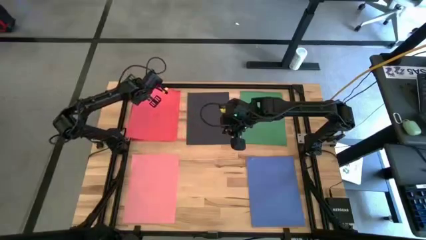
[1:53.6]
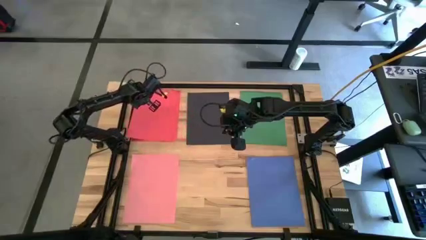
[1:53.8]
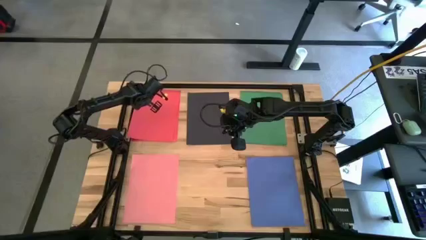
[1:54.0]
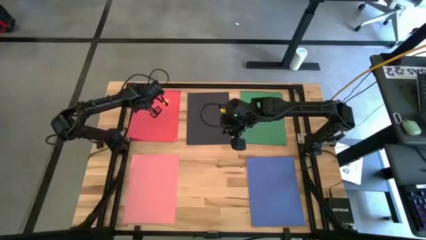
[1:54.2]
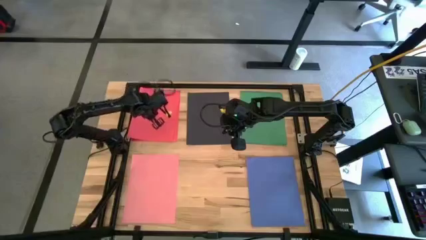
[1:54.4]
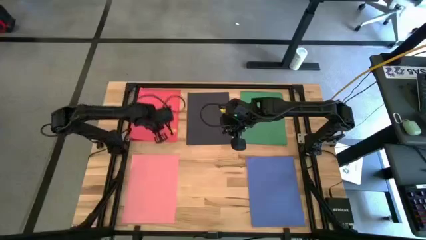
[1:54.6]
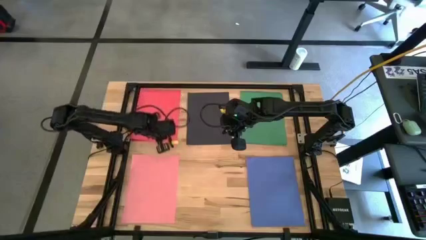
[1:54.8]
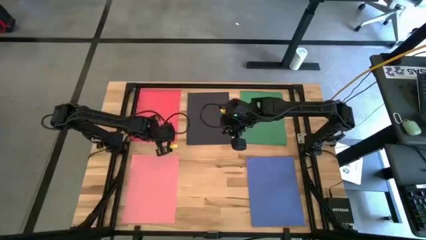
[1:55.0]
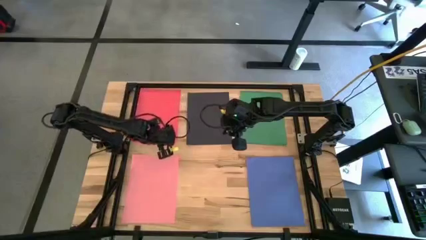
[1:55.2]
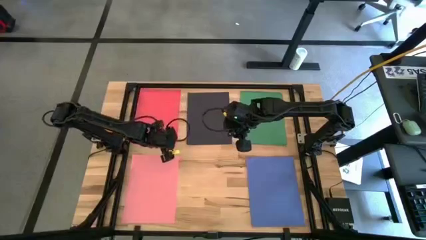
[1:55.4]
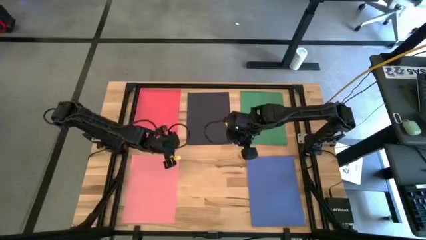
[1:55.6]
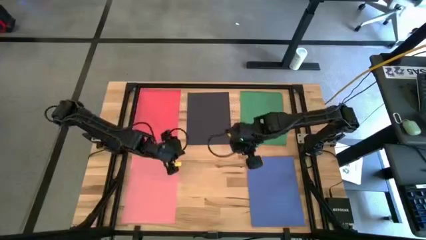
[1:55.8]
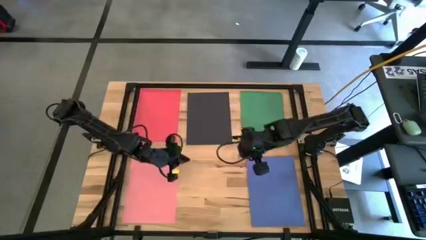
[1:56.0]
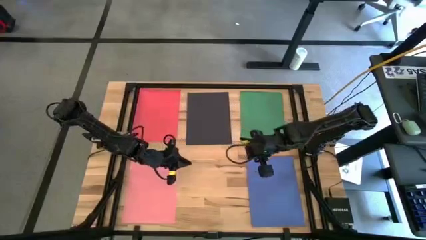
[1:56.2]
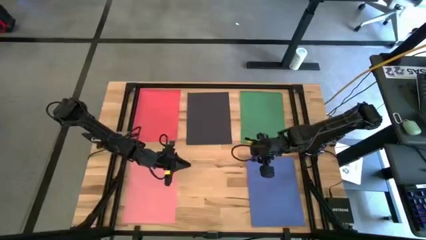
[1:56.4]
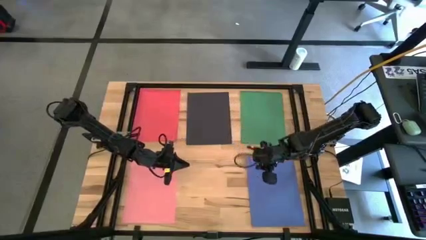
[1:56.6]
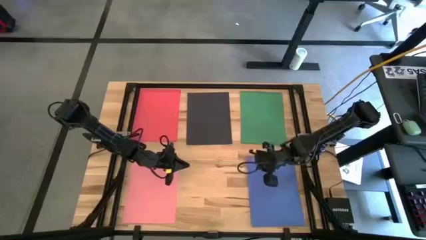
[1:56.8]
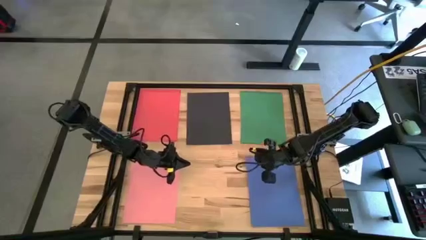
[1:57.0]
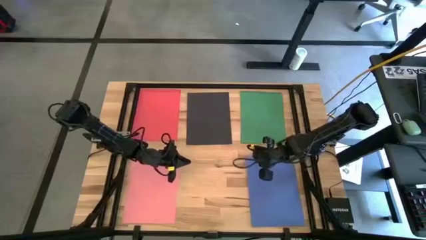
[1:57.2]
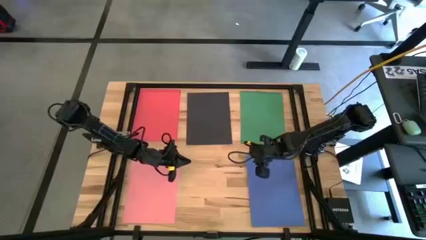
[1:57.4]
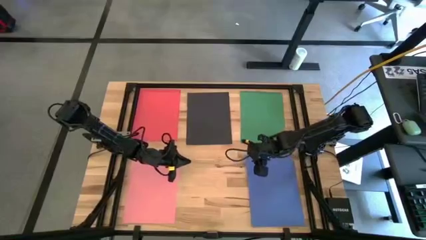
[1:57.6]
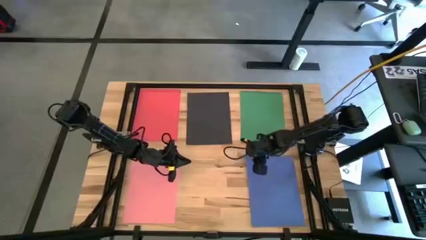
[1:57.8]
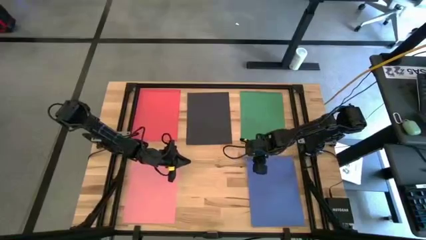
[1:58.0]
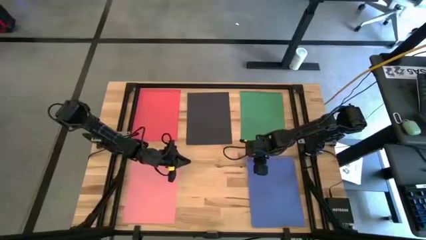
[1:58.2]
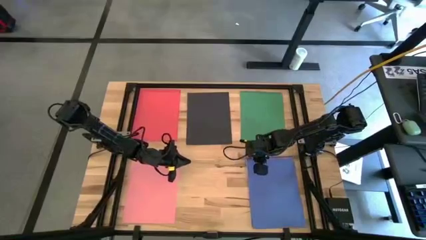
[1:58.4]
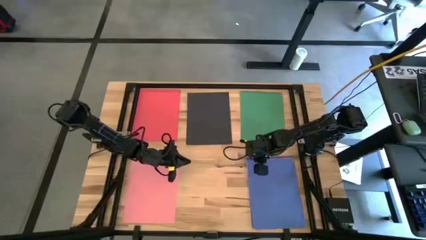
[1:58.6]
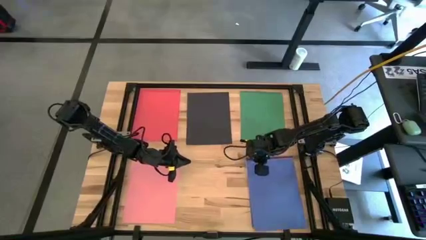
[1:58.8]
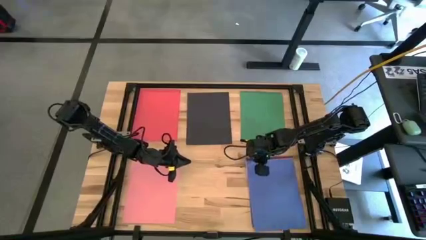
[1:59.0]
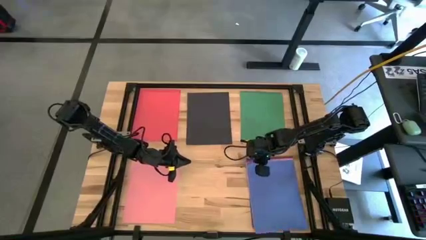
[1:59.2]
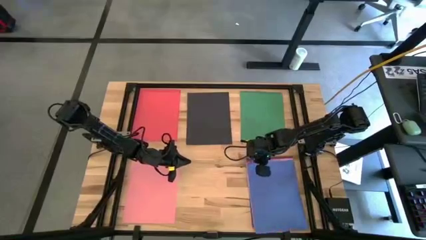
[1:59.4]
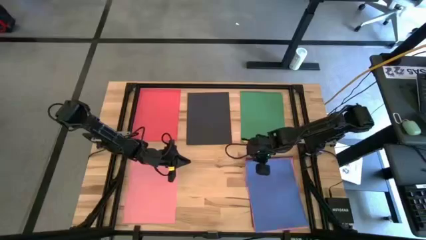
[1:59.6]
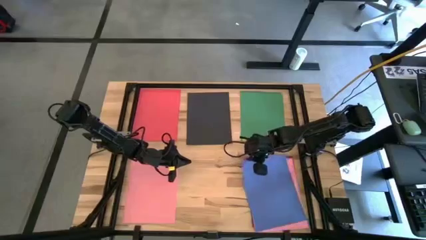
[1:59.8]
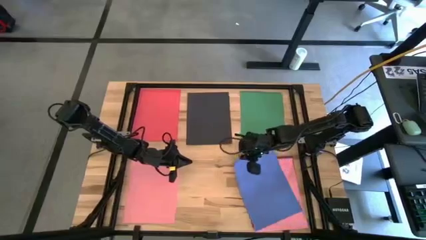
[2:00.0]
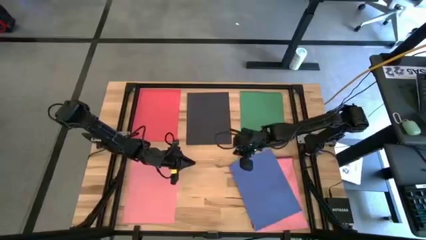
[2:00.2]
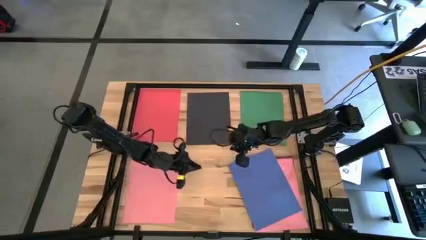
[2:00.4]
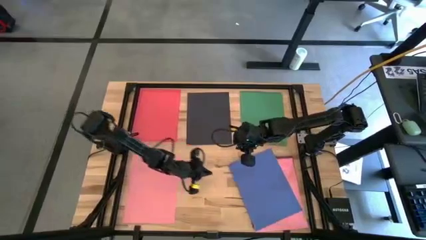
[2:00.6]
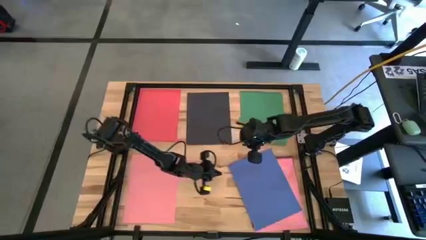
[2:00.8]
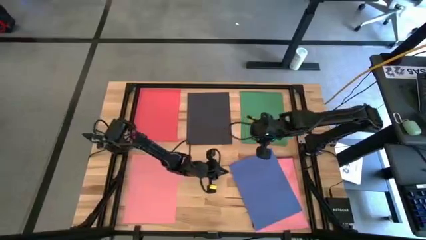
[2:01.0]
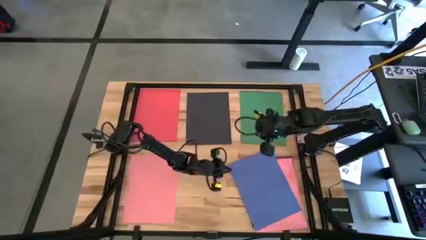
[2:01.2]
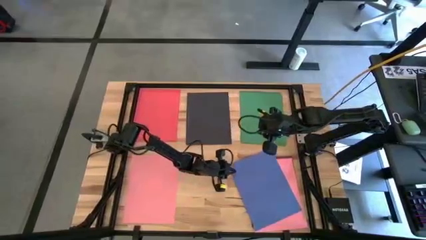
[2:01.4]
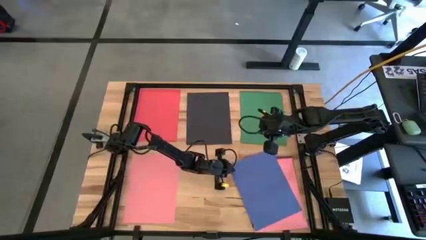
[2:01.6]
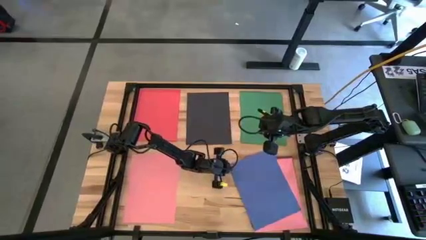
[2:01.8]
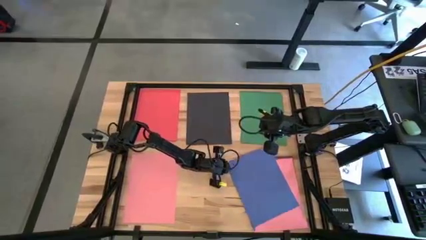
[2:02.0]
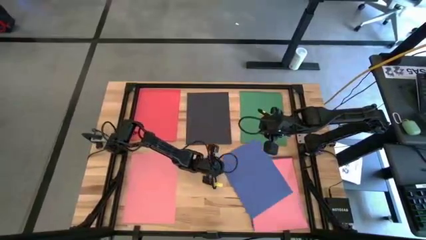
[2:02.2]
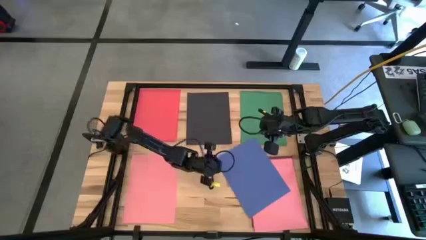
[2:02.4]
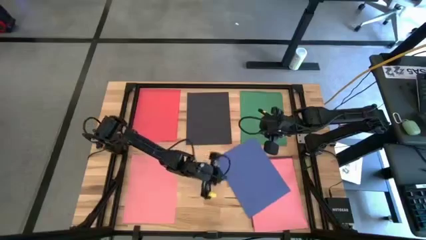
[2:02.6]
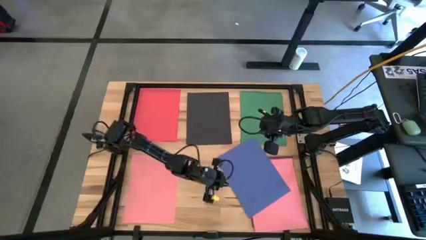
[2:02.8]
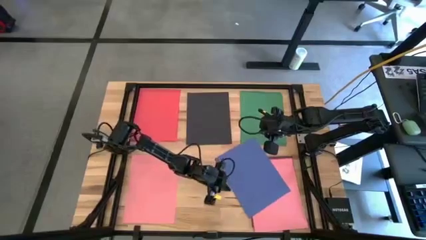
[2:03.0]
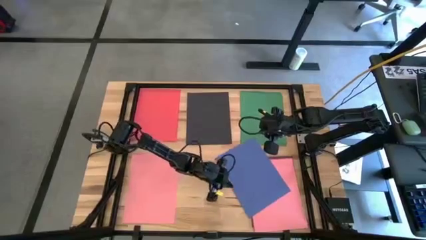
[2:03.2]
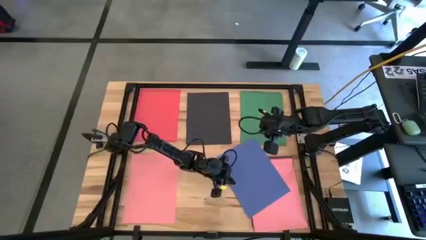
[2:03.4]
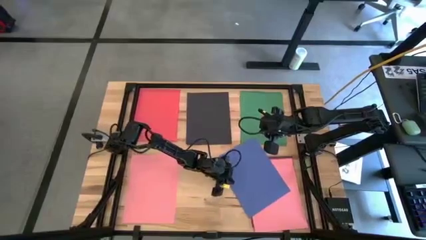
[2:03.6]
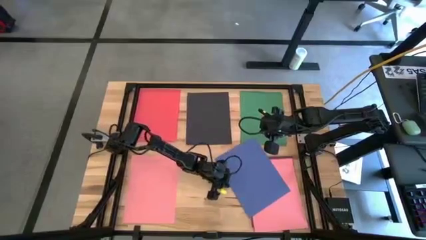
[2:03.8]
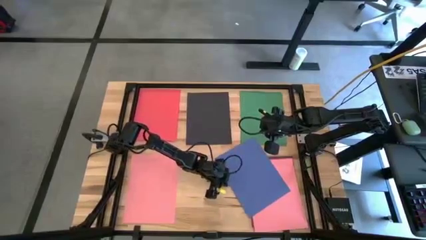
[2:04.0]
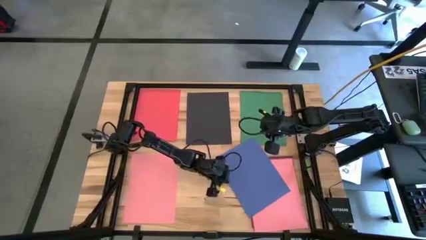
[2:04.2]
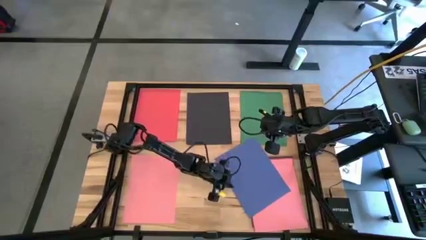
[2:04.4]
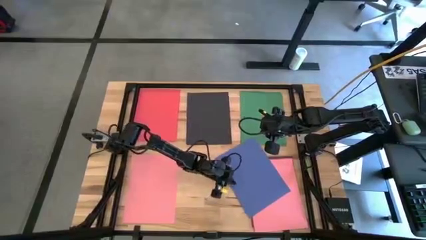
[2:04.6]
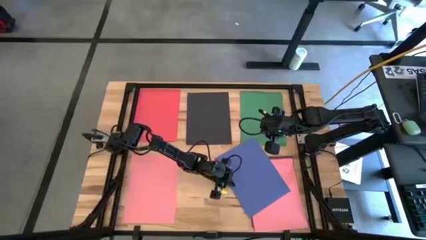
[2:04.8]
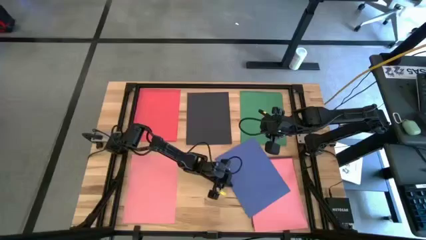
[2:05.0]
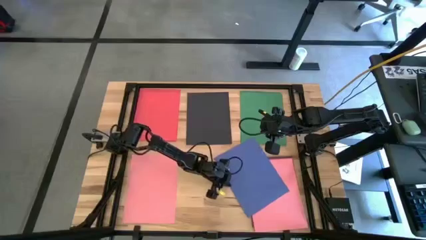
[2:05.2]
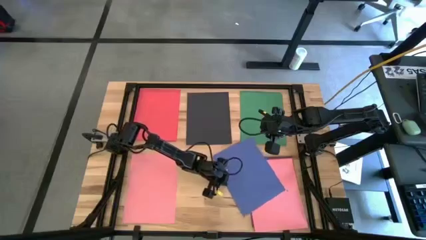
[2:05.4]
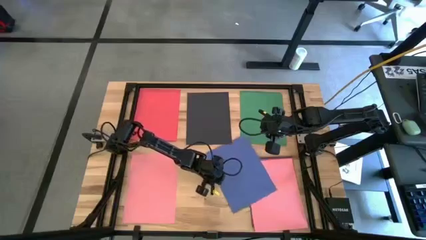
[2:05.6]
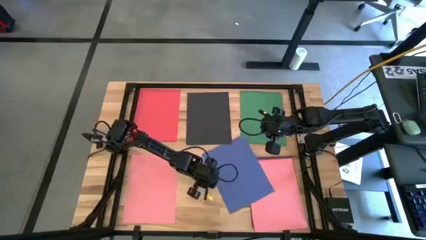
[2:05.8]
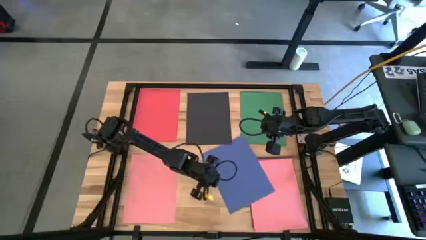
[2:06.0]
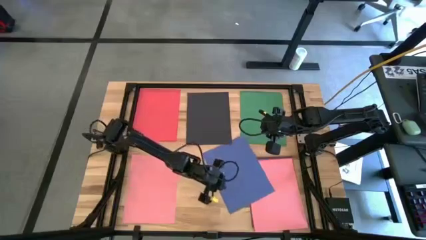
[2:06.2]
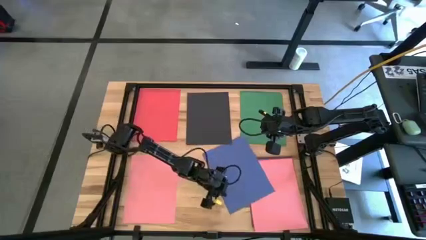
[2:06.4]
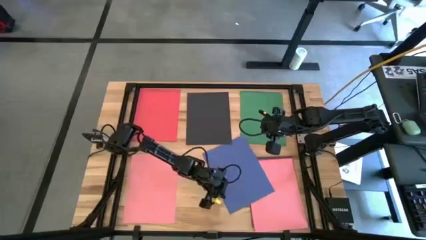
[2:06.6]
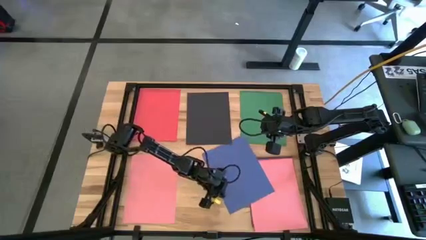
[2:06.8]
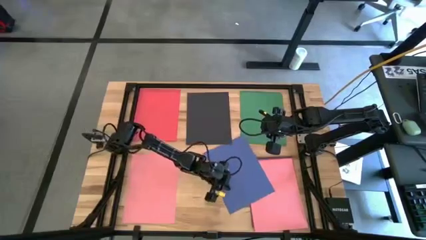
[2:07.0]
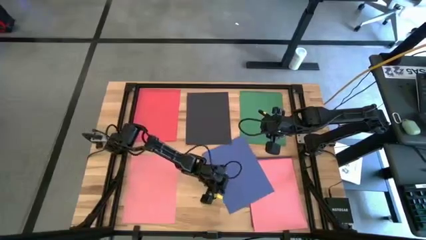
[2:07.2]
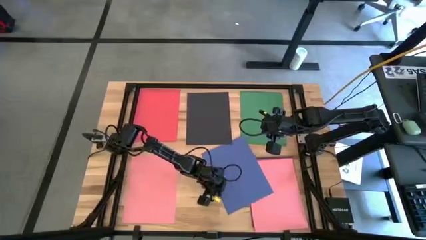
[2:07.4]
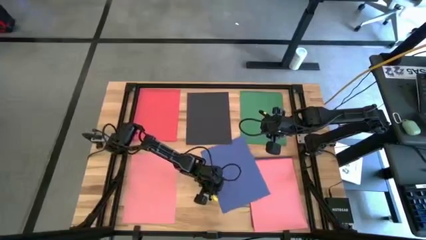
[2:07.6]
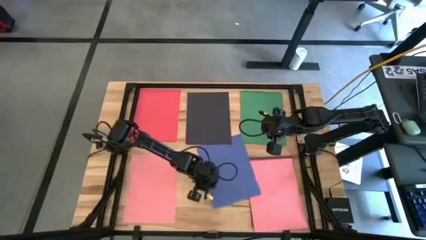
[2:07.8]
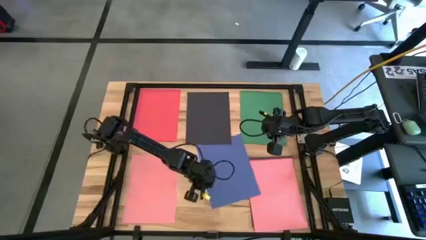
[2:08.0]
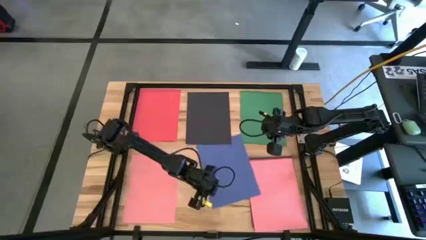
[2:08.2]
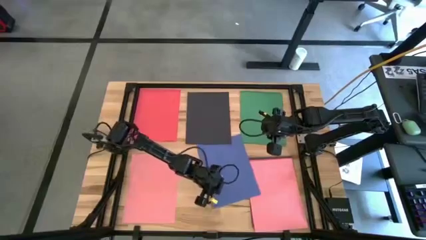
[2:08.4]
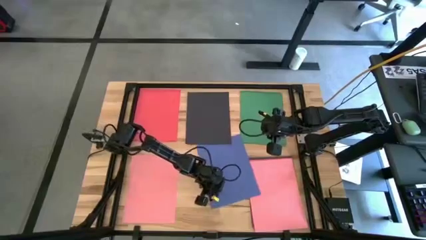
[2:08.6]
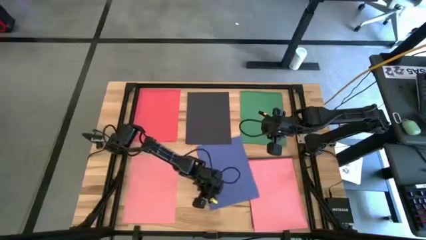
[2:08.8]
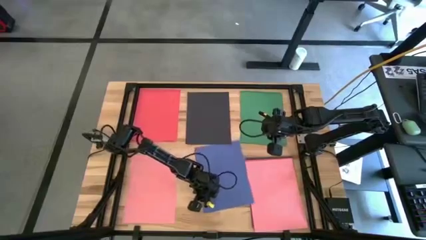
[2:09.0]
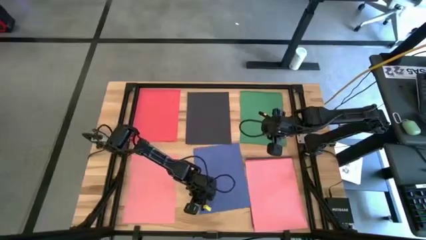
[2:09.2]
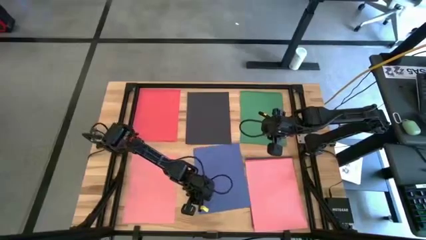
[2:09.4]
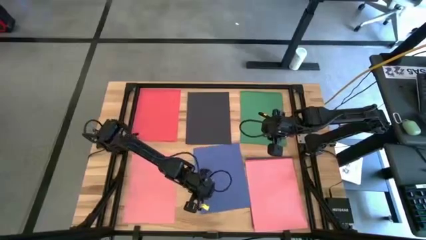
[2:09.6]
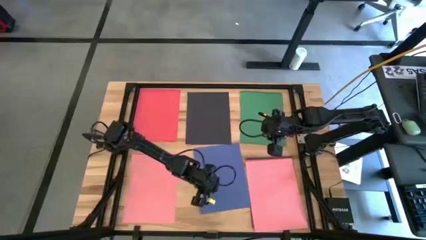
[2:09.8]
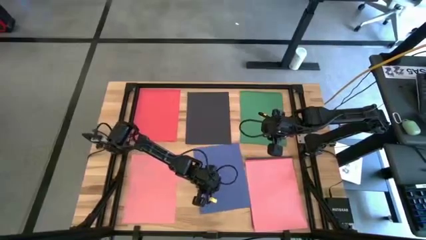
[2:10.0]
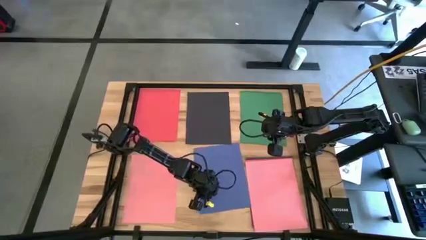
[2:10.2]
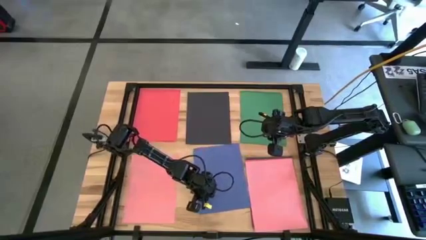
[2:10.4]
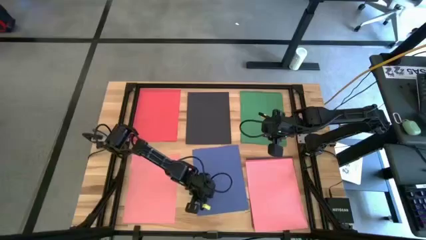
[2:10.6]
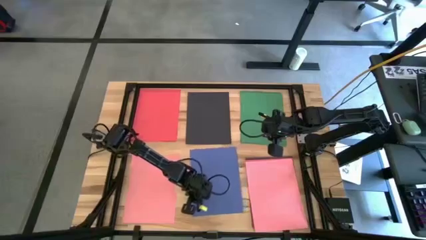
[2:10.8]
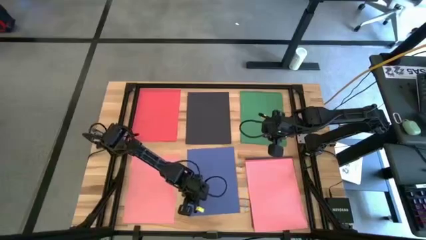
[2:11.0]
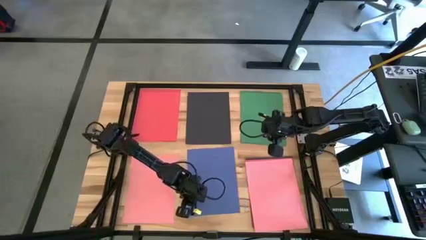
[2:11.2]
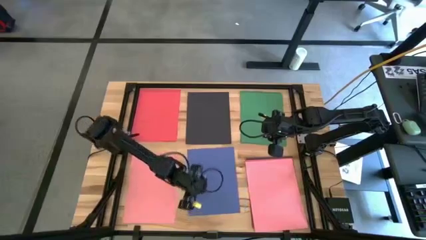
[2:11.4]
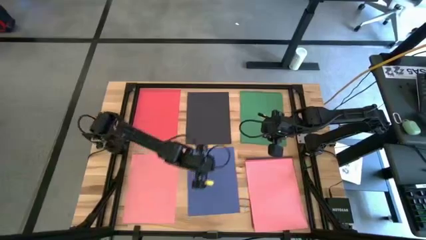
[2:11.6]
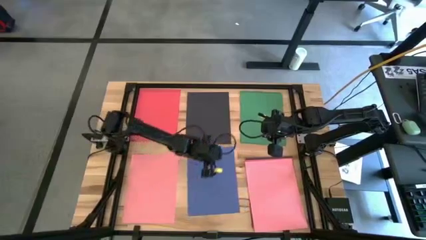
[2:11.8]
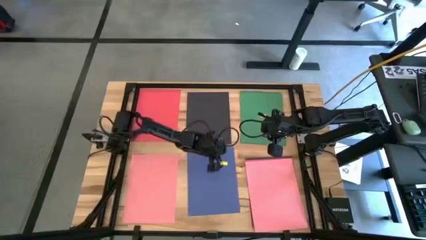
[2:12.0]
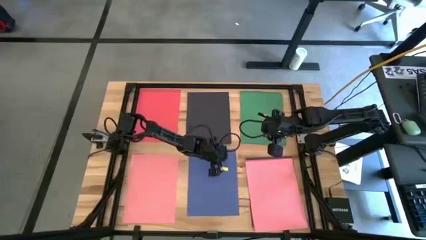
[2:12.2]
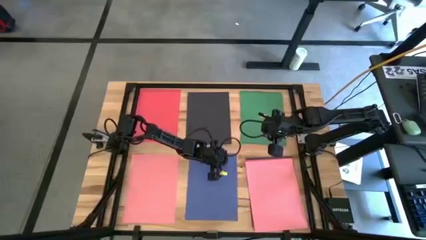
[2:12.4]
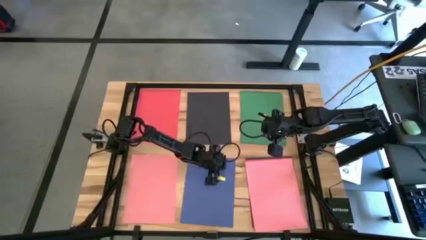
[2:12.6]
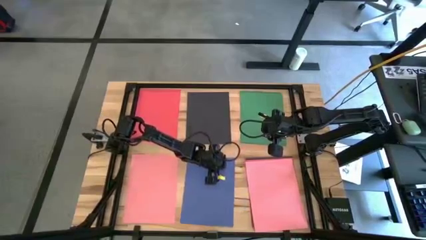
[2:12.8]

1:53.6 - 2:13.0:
Task: Organize paper
Move the blue paper to the bottom center of the table
